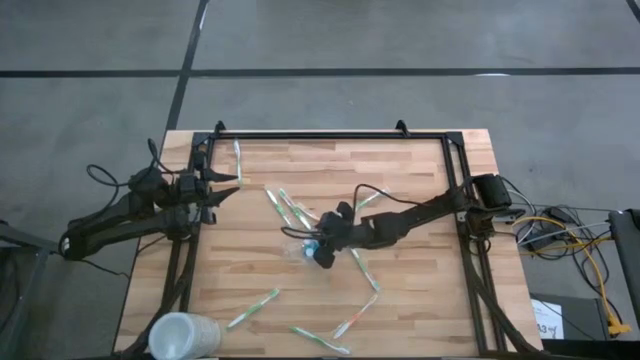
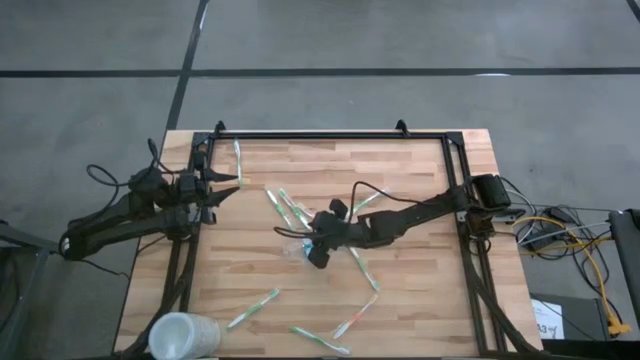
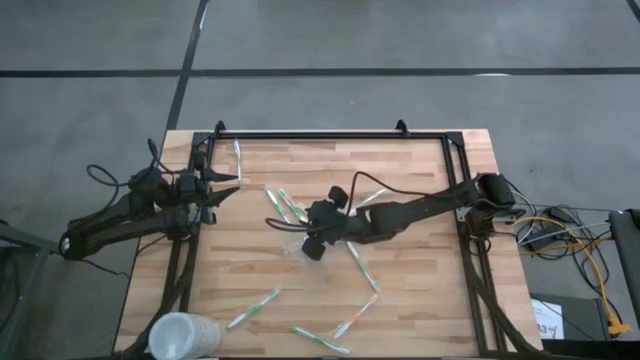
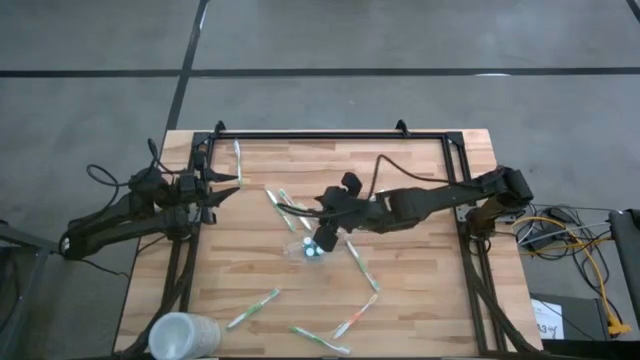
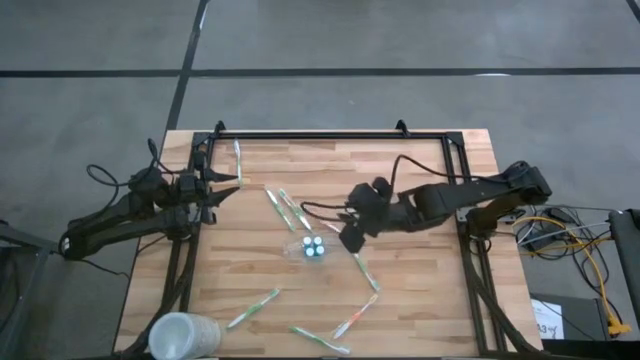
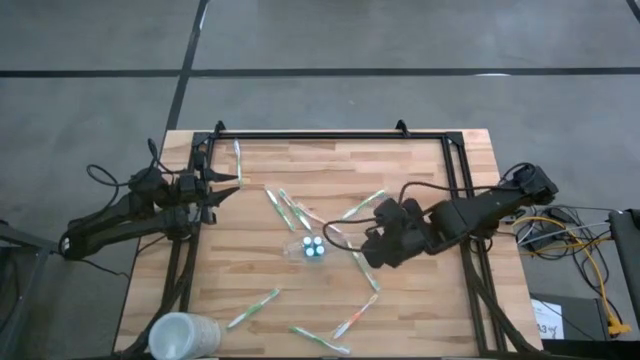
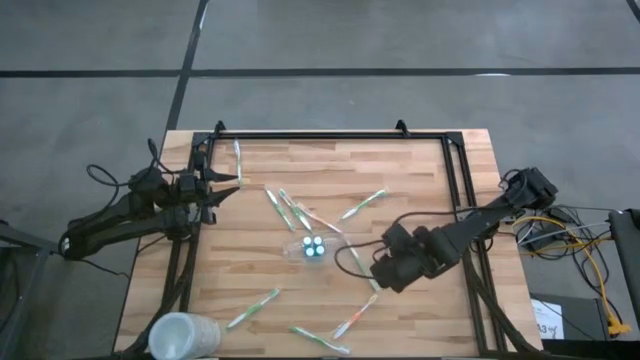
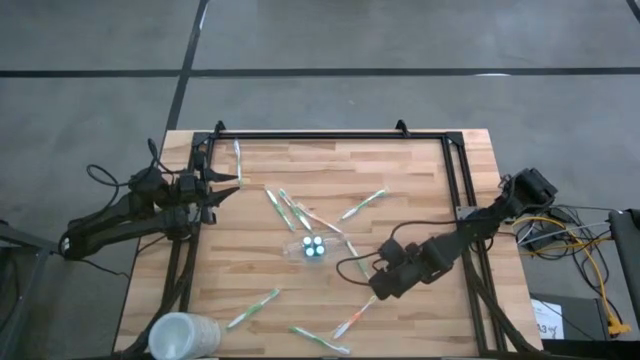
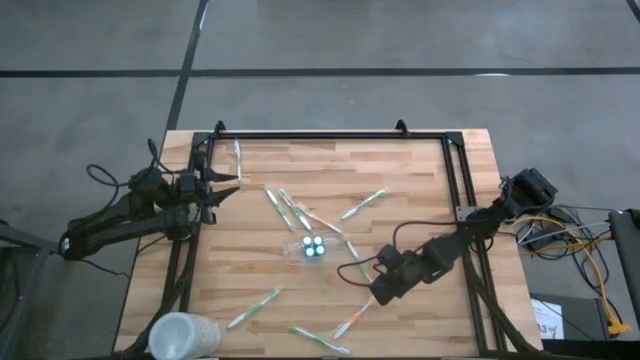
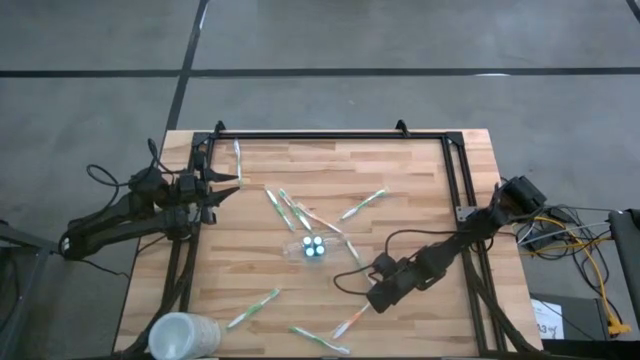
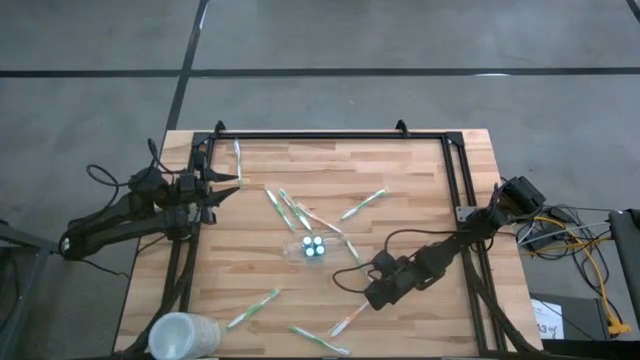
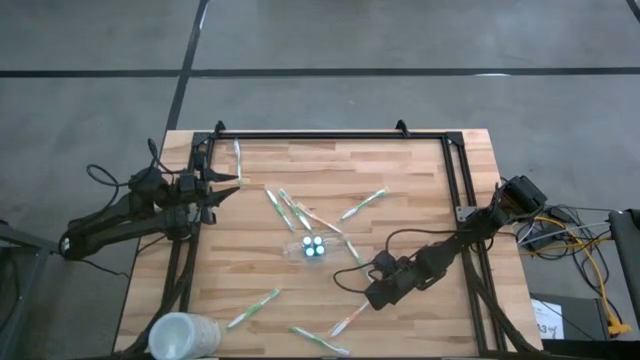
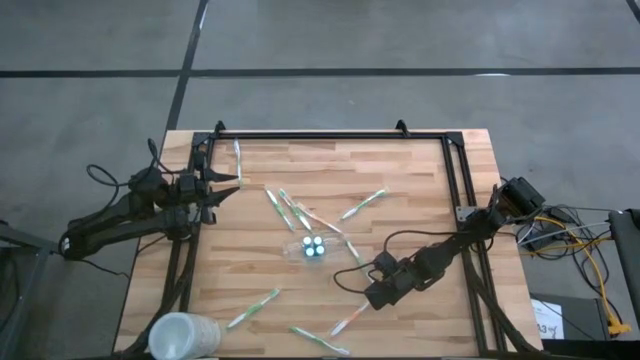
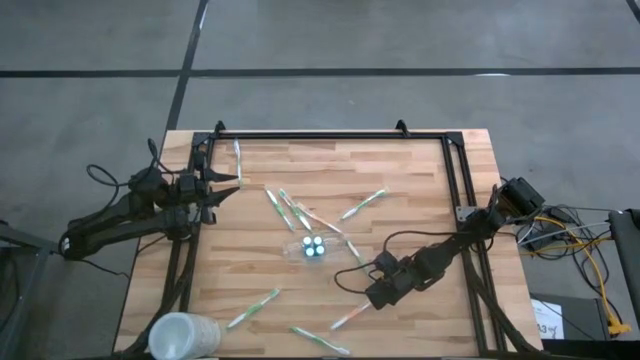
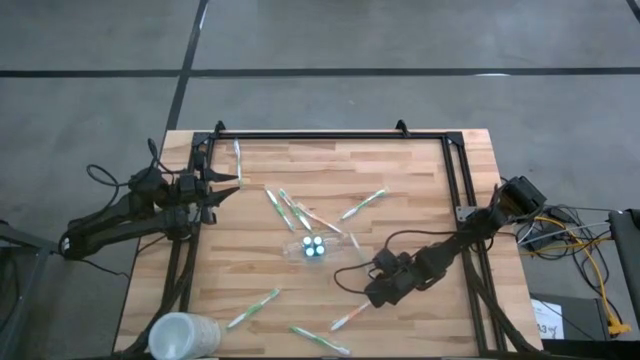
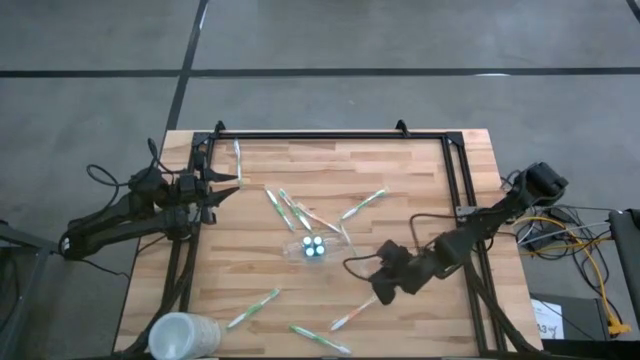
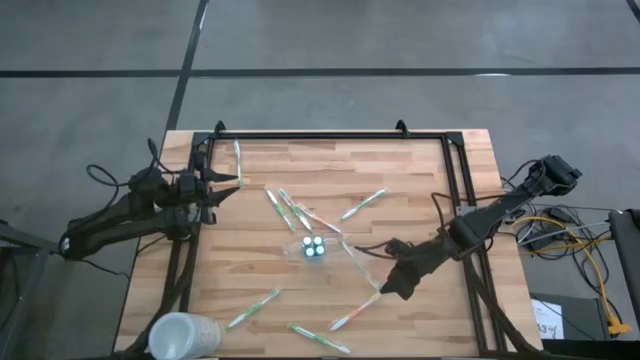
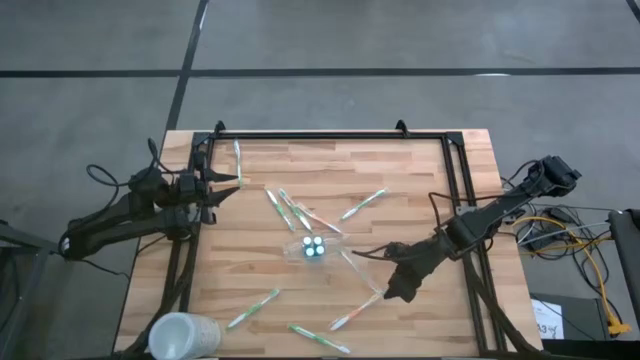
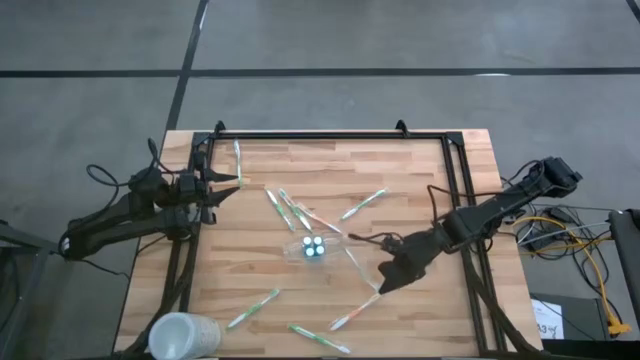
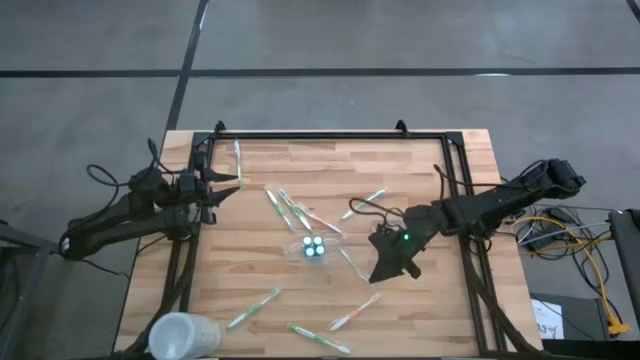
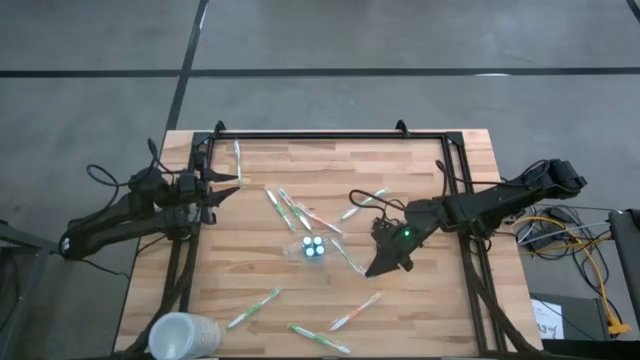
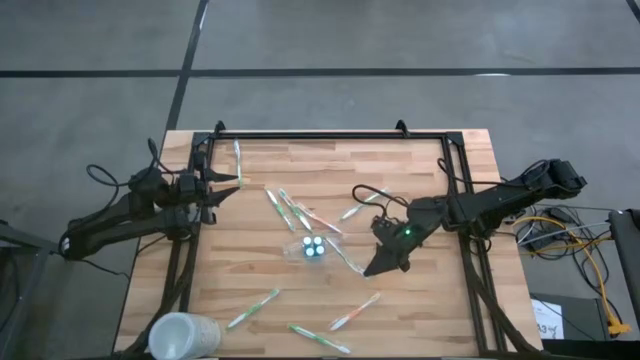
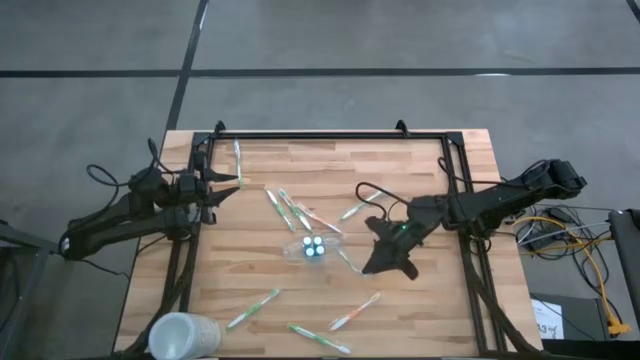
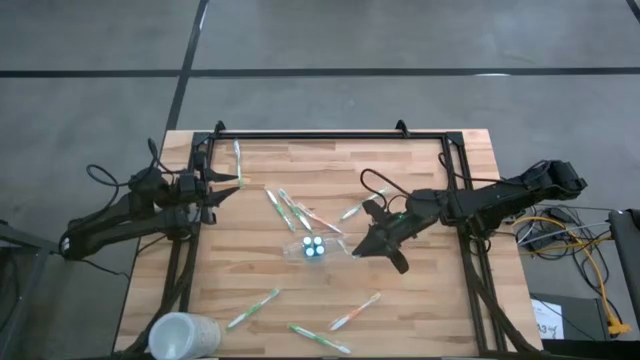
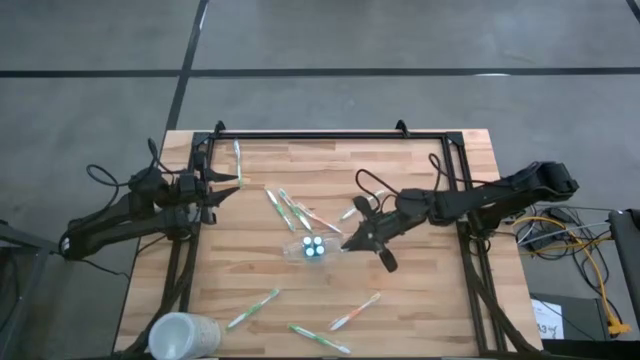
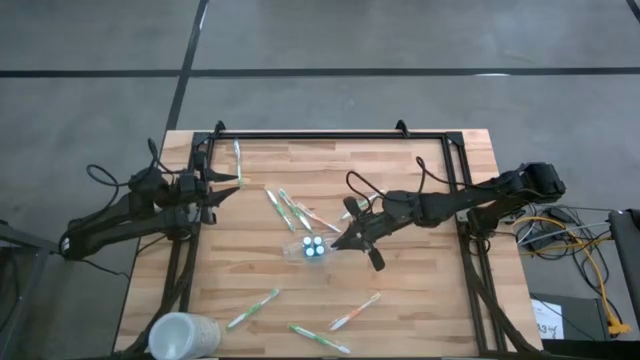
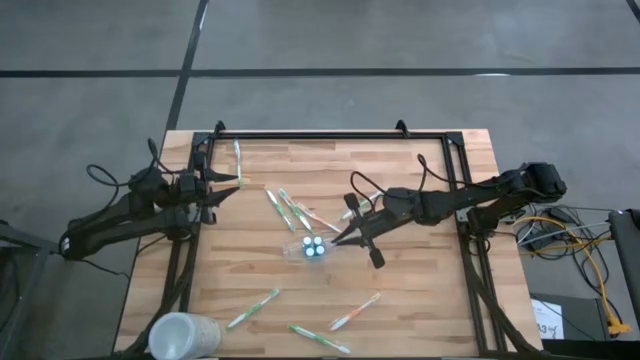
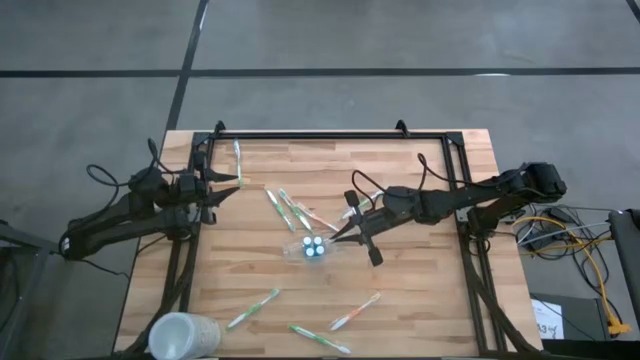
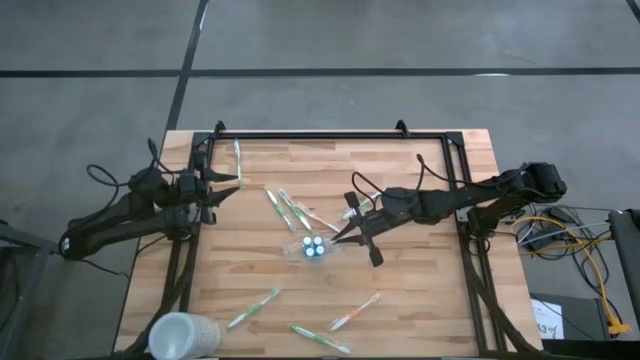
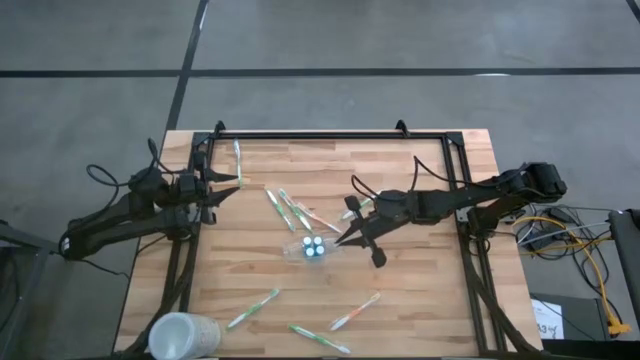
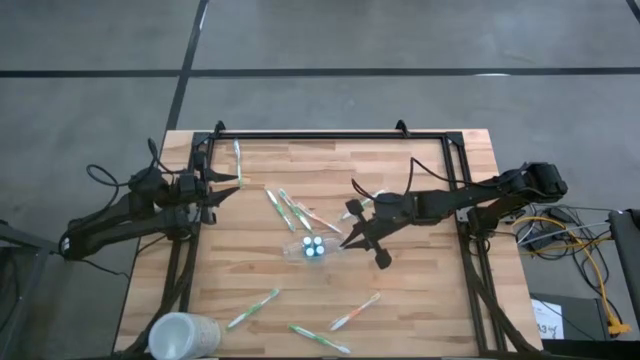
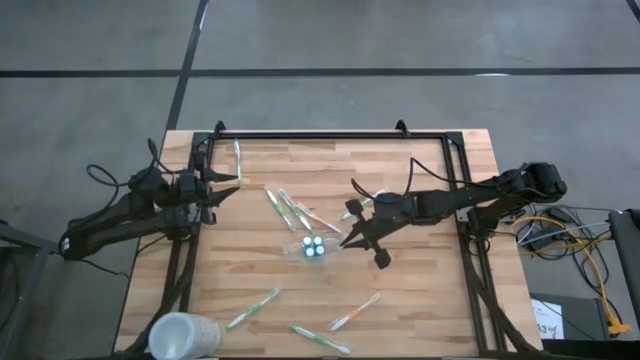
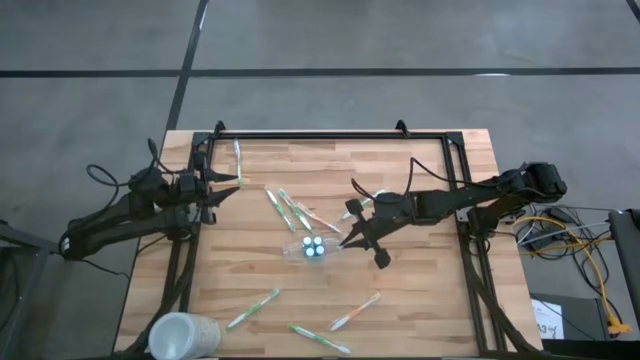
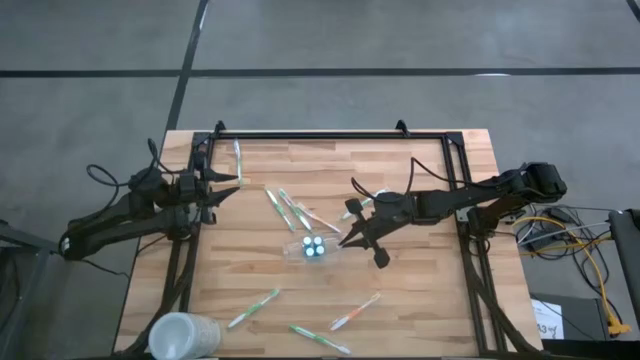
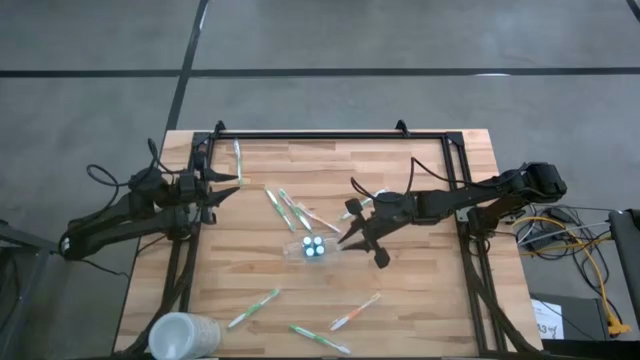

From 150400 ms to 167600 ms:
Task: Pick & Place toothbrushing station
Put the green toothbrush into the transparent organizer

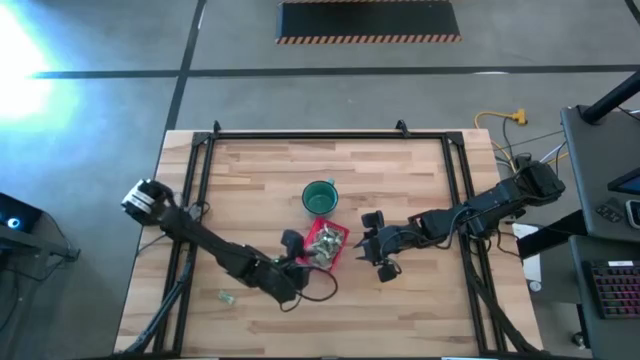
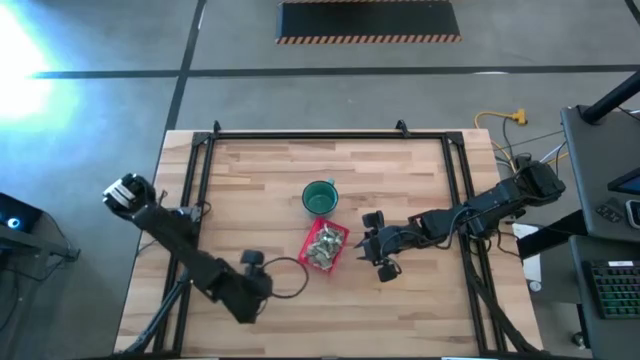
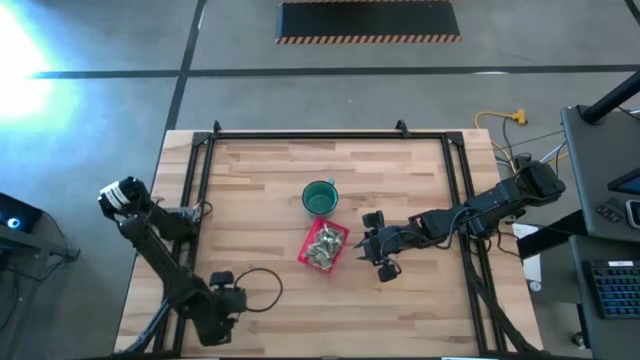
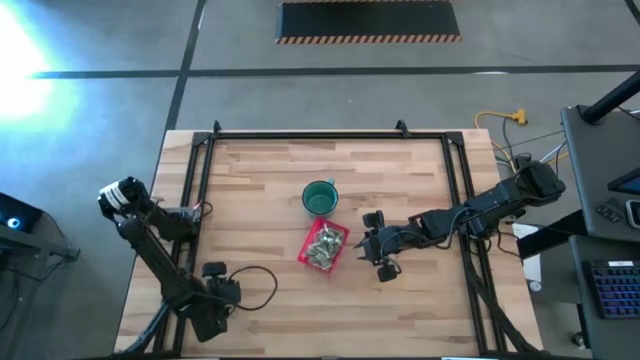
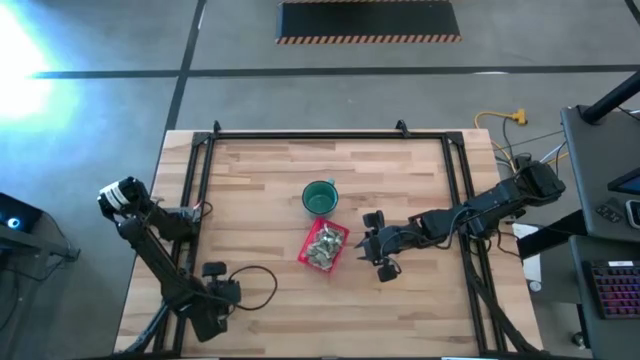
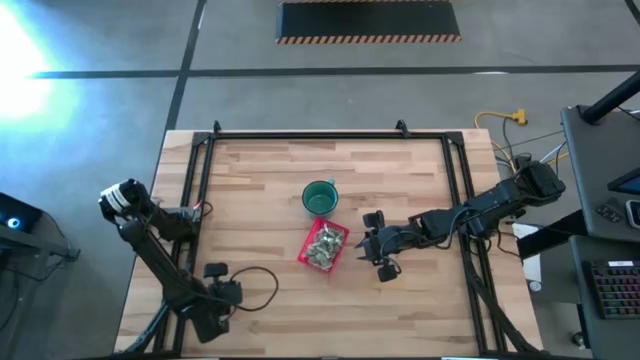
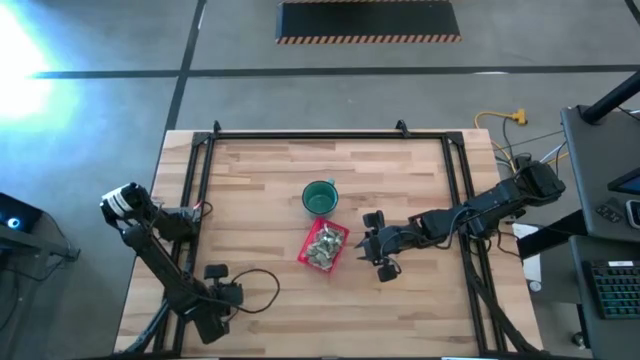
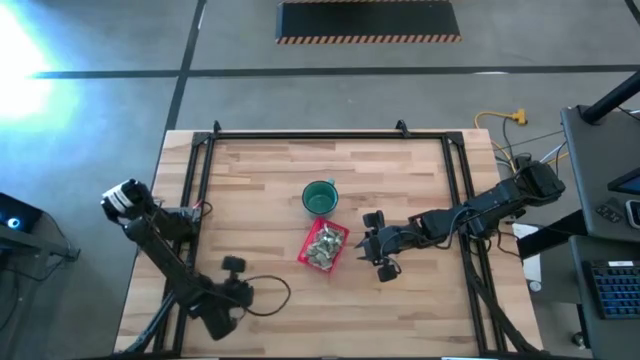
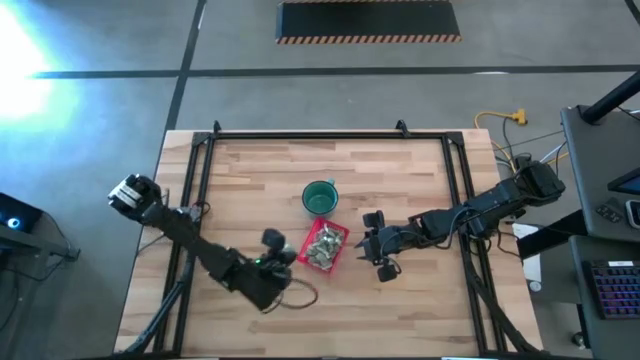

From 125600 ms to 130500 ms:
Task: Pick and place items into bin
Put the light green stevia packet into the red bin
